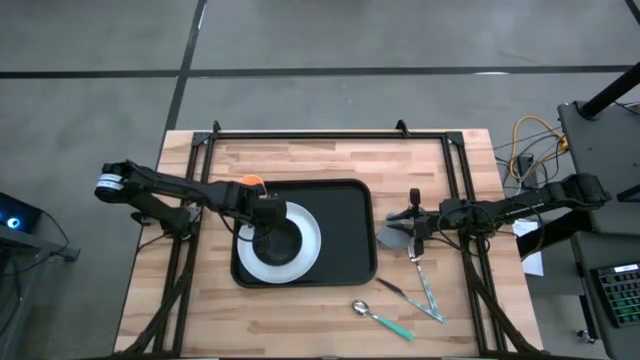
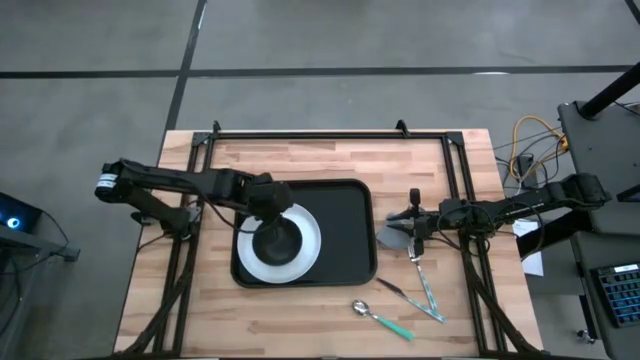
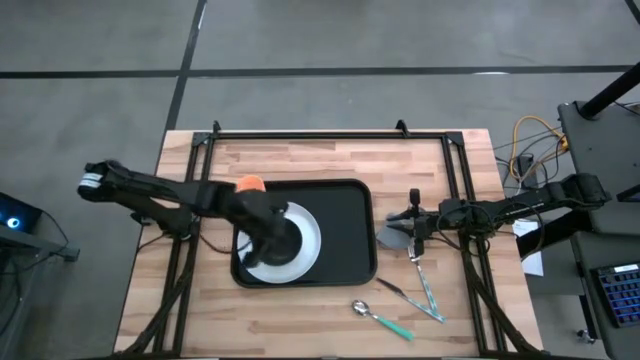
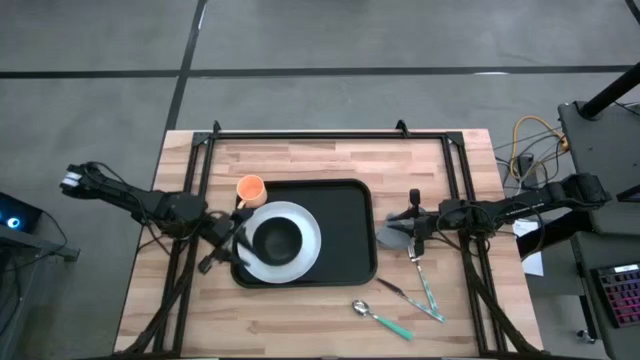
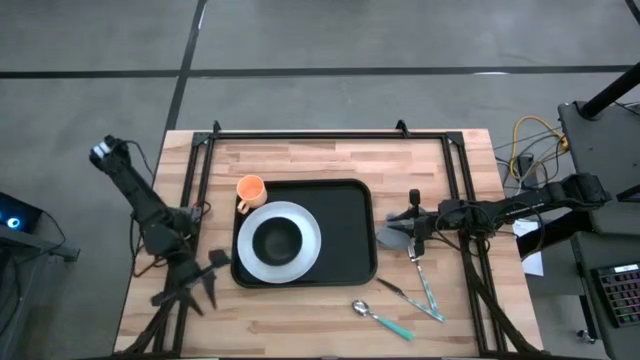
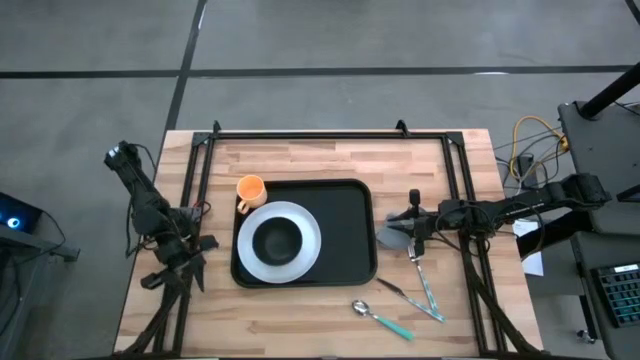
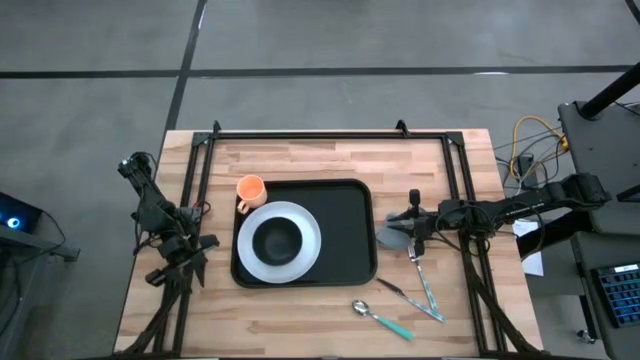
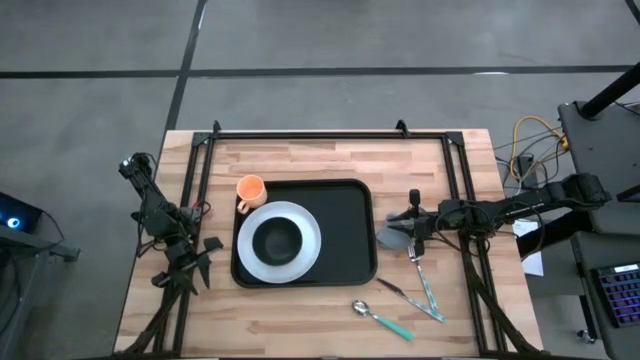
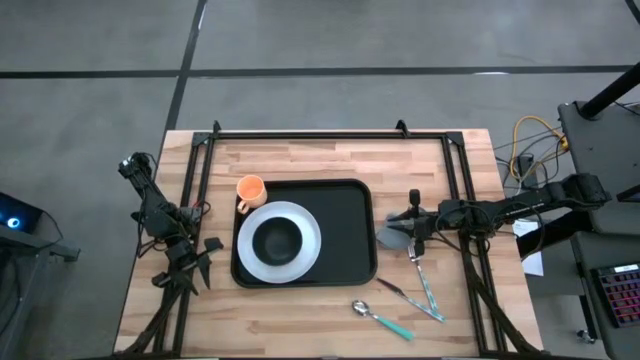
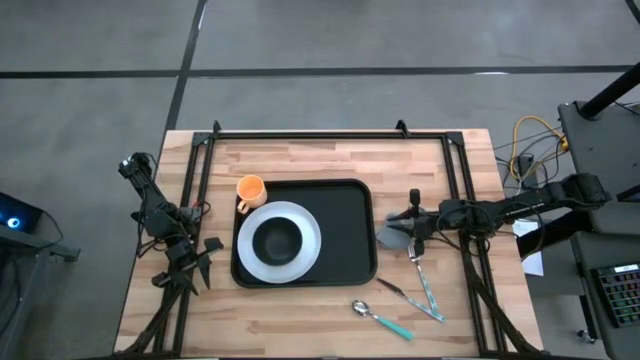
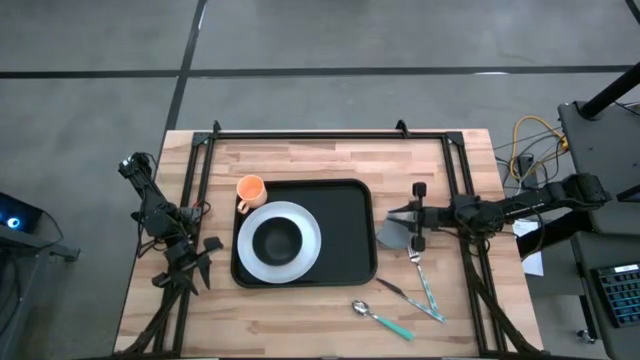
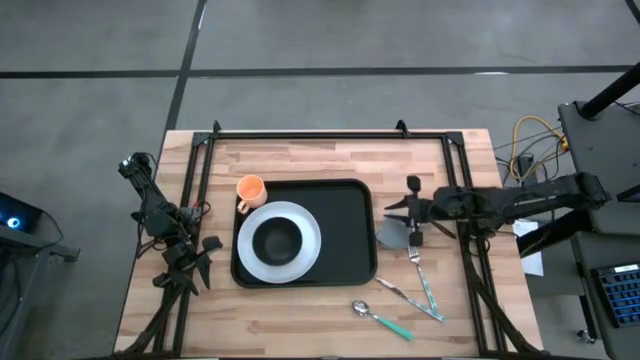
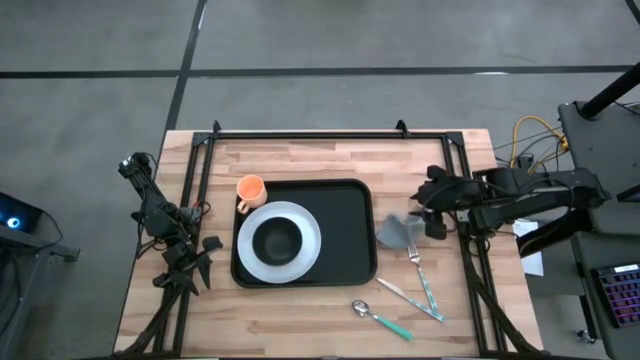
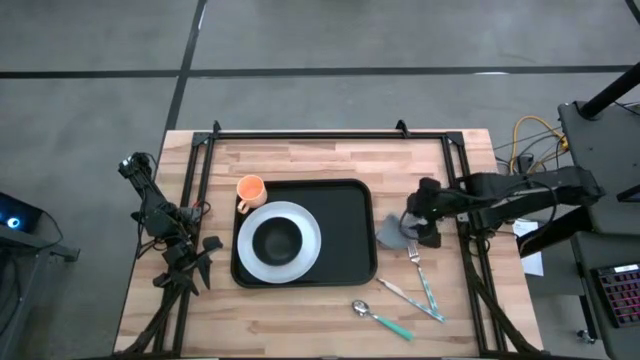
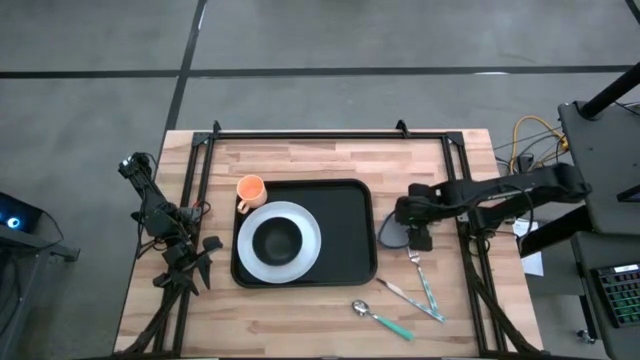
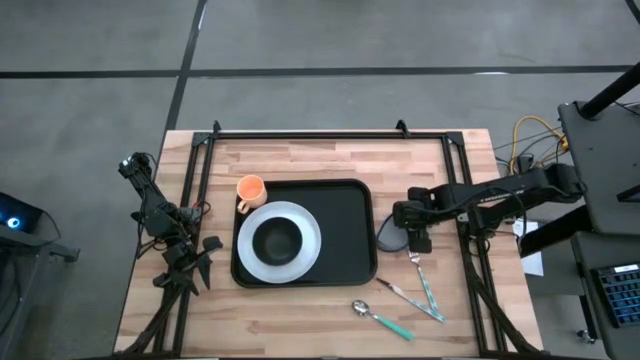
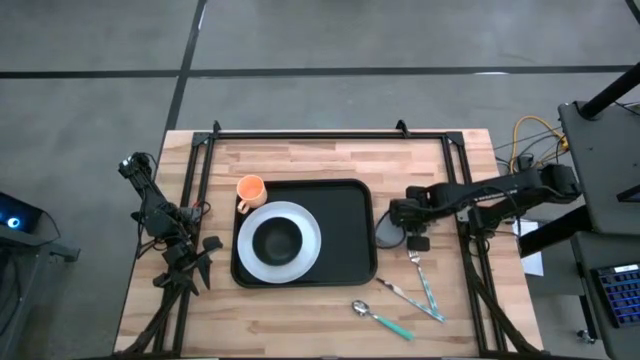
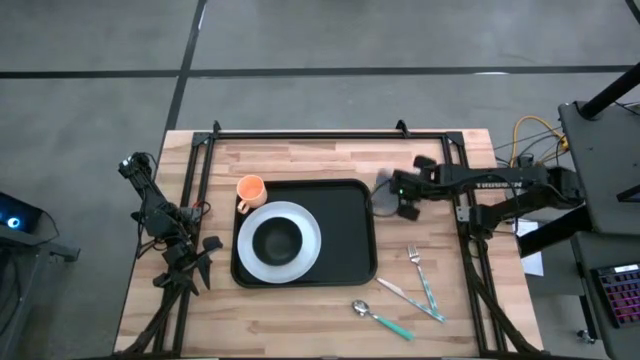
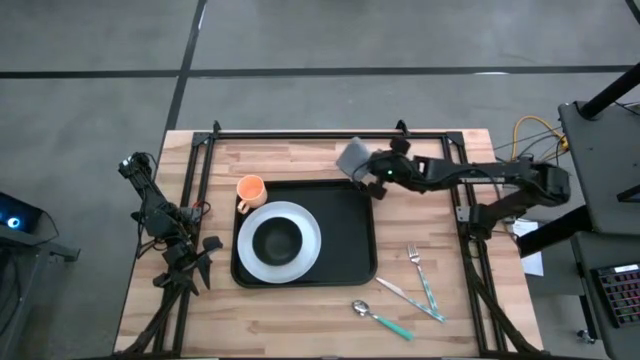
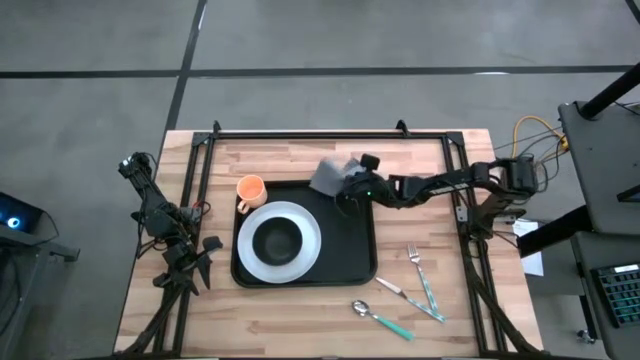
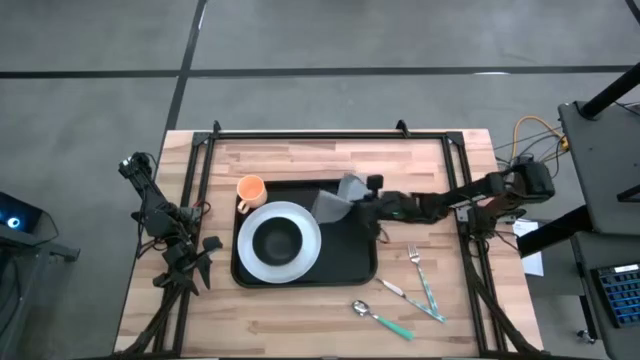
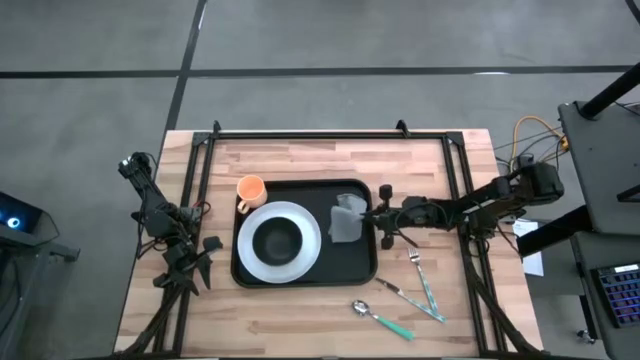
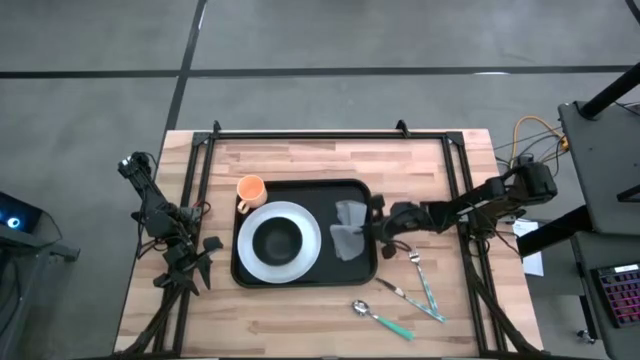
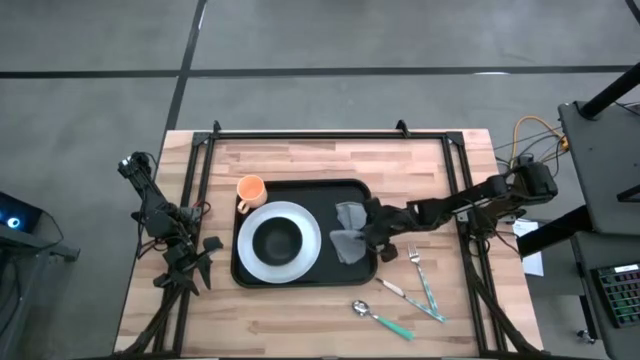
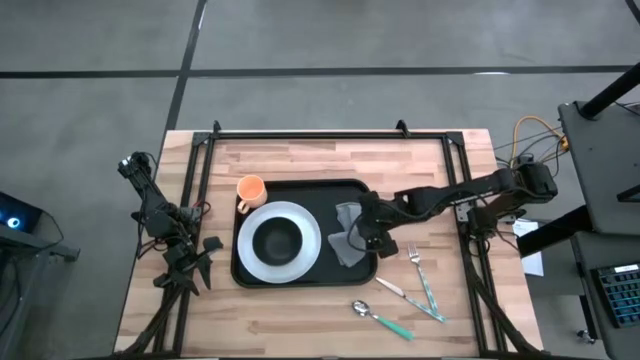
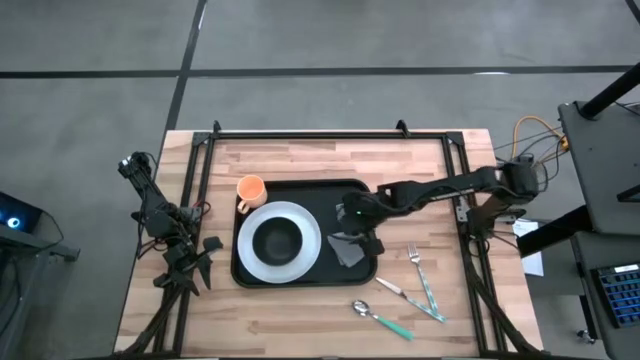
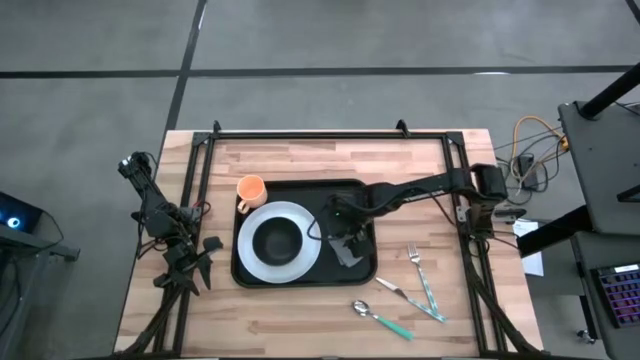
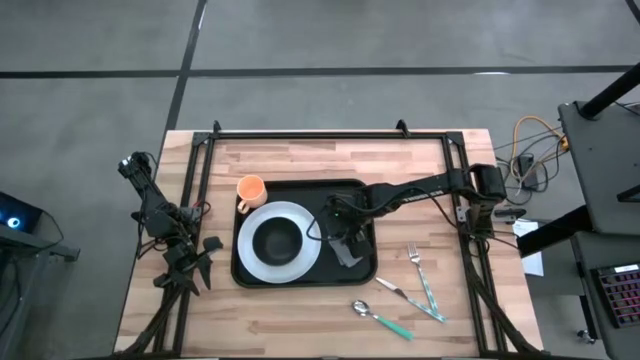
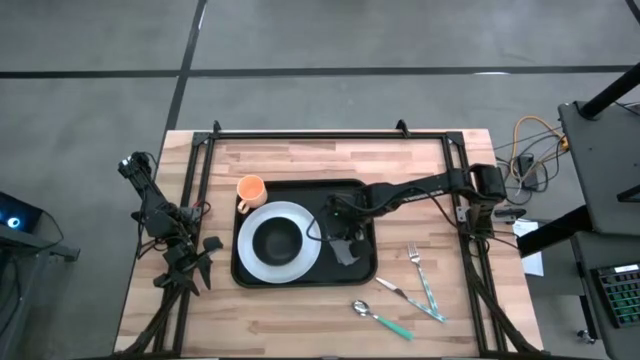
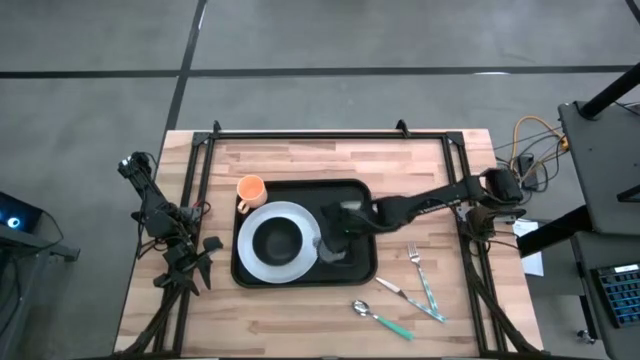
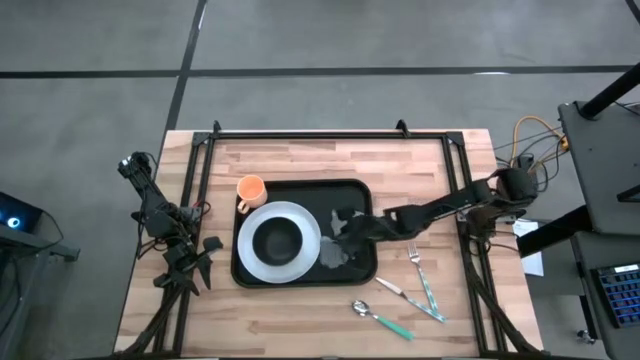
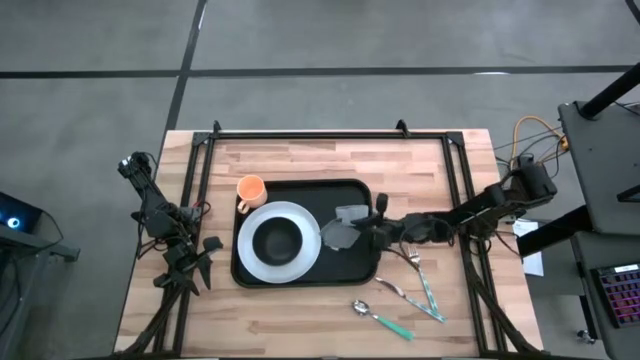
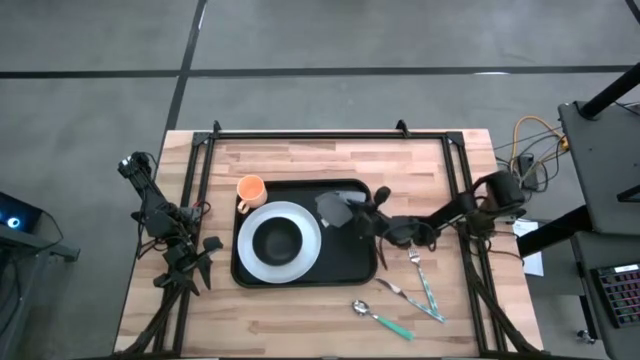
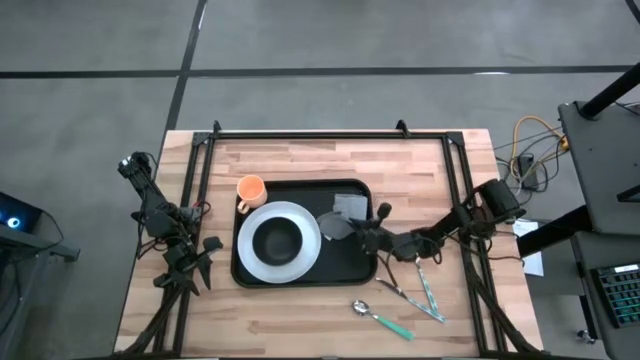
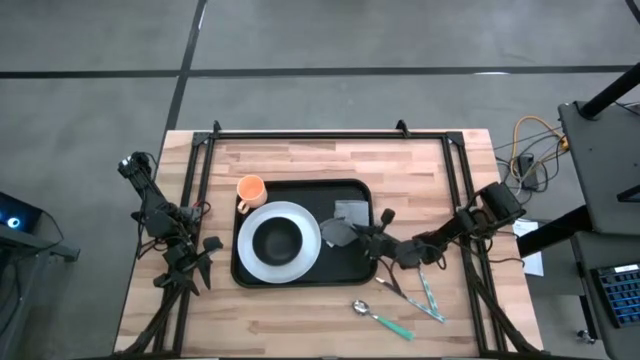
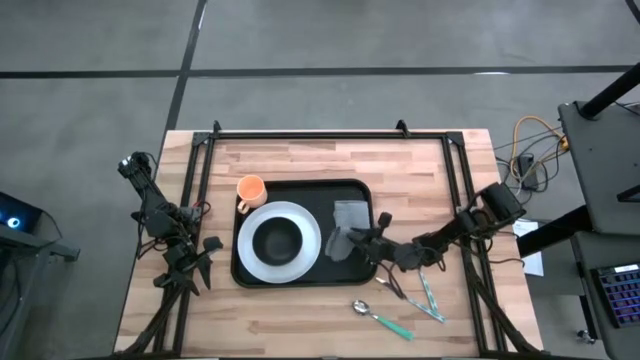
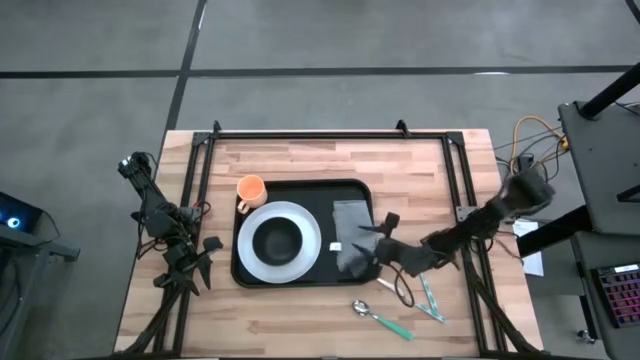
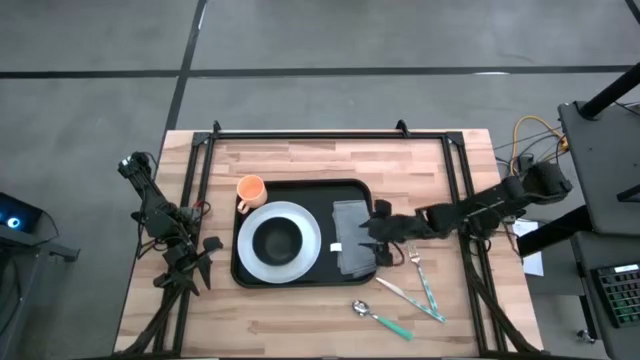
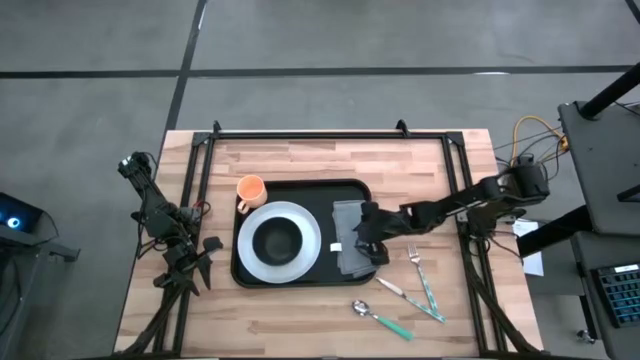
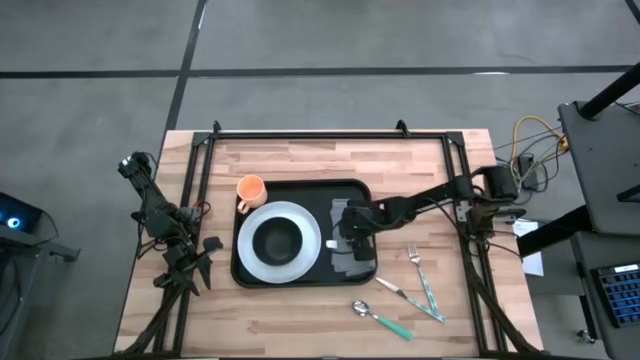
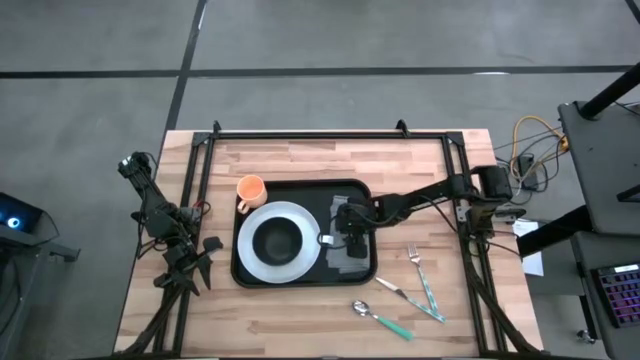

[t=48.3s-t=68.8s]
Task: Set up tray
Put the gray napkin on the black tray
